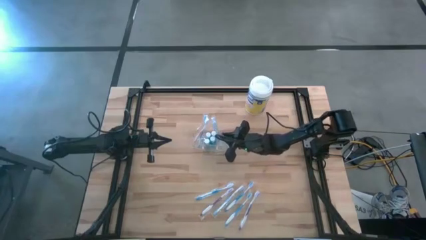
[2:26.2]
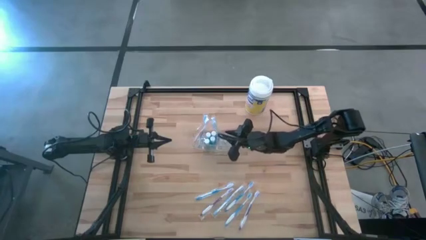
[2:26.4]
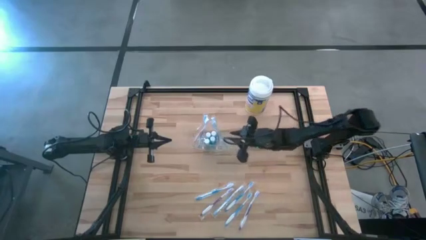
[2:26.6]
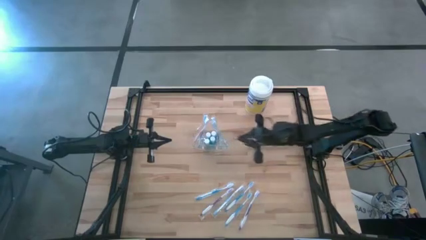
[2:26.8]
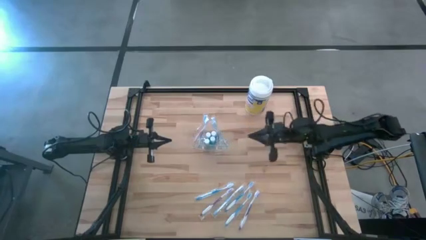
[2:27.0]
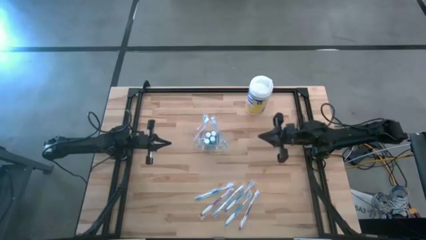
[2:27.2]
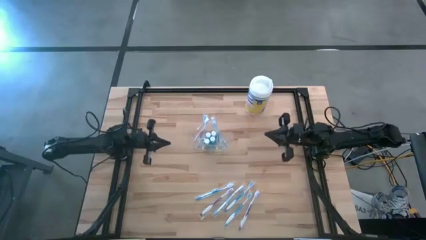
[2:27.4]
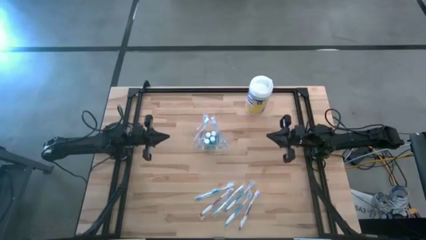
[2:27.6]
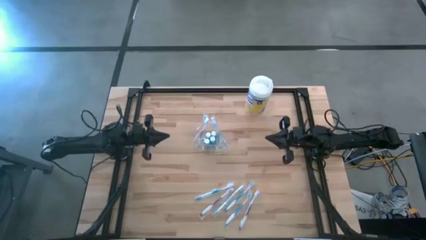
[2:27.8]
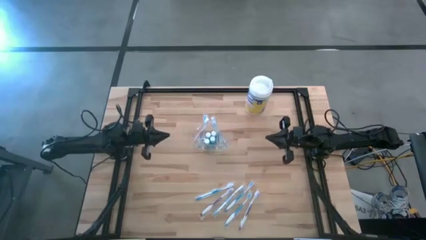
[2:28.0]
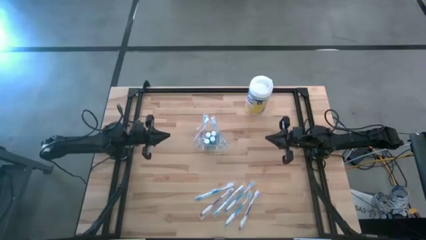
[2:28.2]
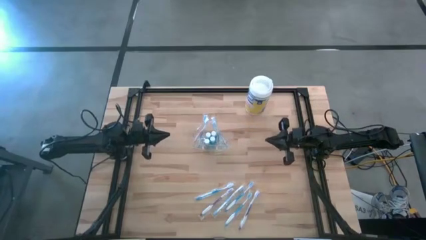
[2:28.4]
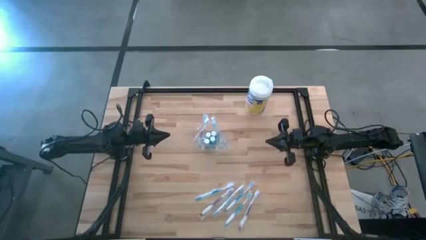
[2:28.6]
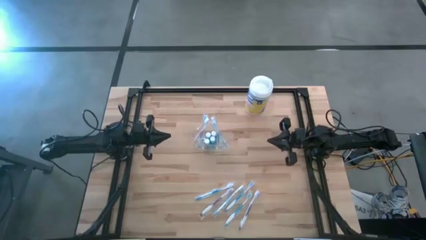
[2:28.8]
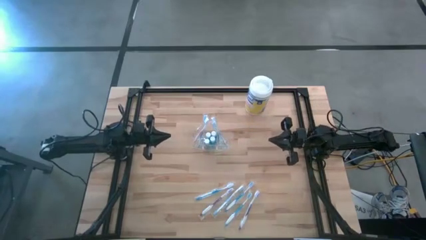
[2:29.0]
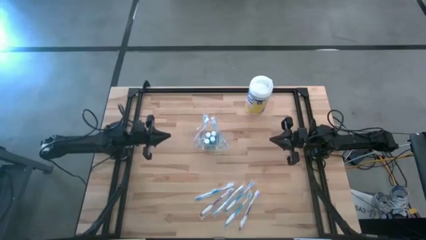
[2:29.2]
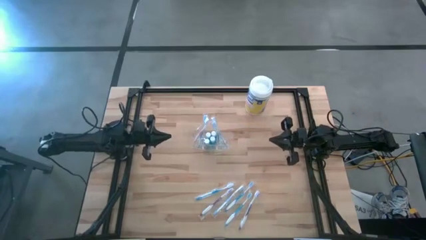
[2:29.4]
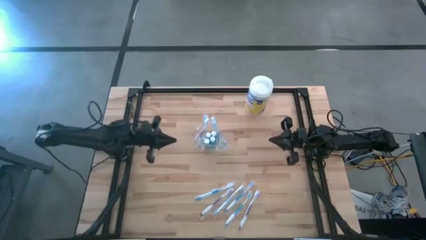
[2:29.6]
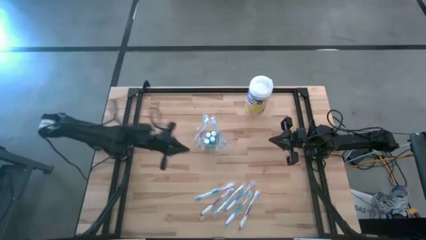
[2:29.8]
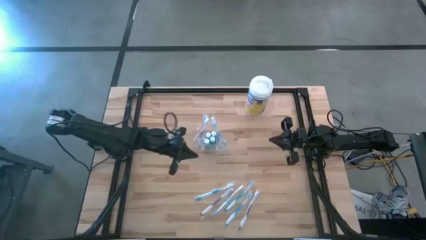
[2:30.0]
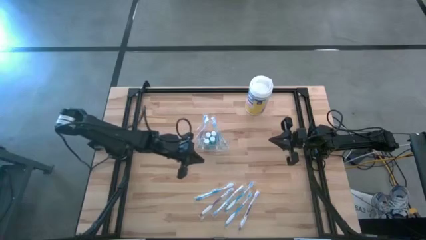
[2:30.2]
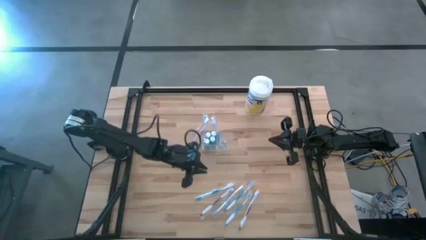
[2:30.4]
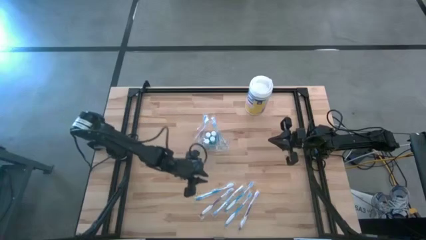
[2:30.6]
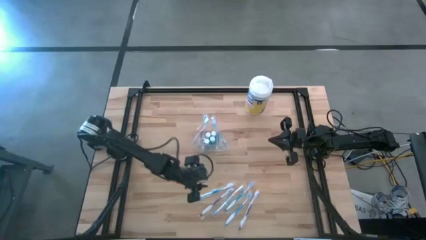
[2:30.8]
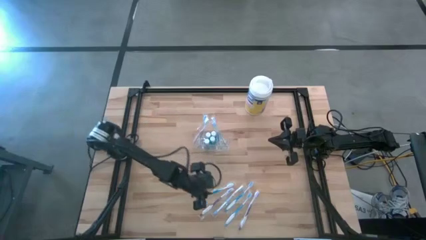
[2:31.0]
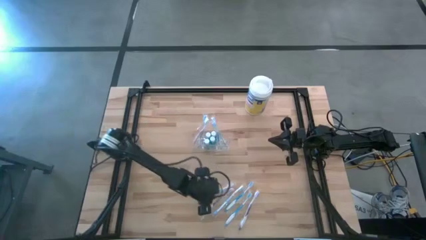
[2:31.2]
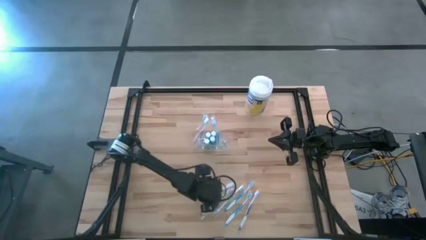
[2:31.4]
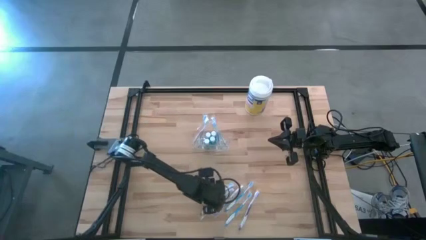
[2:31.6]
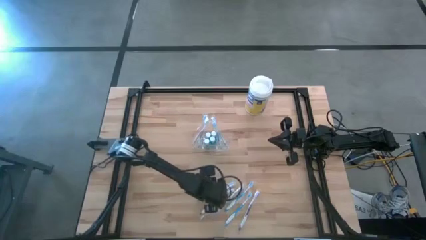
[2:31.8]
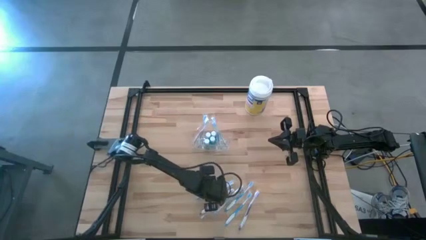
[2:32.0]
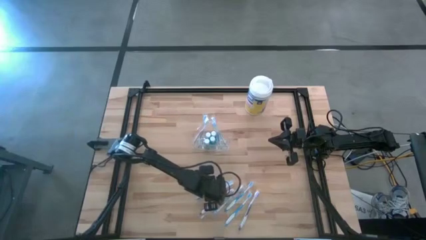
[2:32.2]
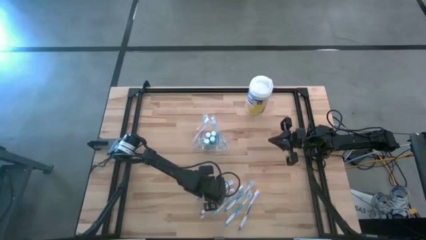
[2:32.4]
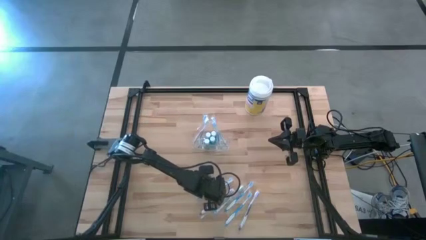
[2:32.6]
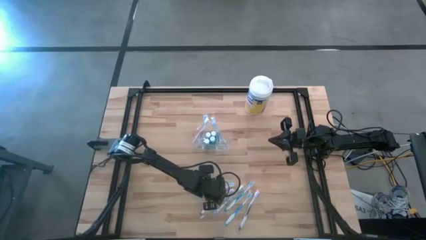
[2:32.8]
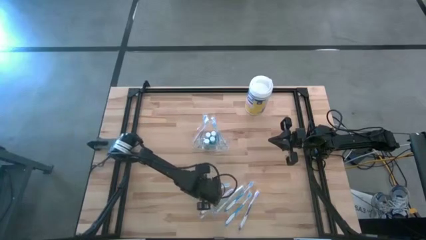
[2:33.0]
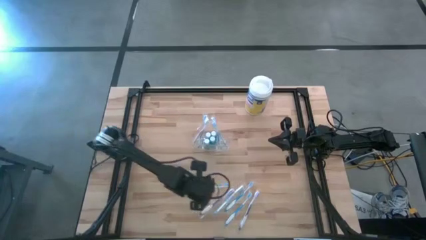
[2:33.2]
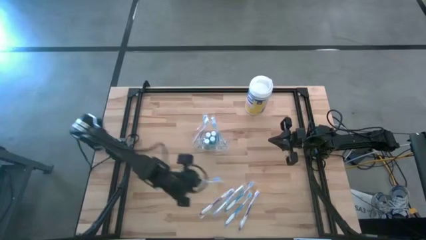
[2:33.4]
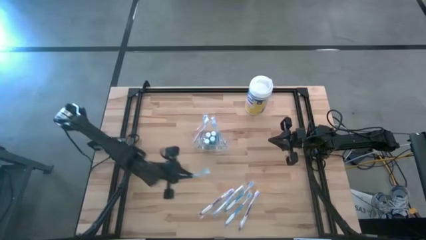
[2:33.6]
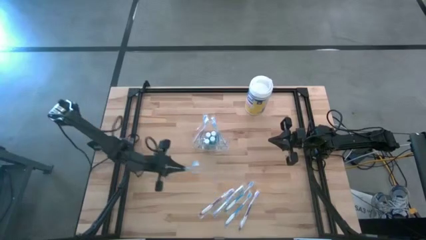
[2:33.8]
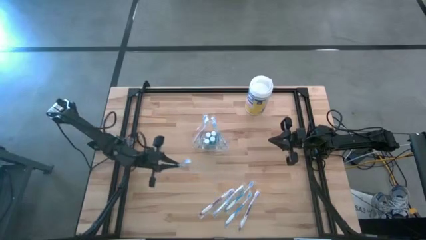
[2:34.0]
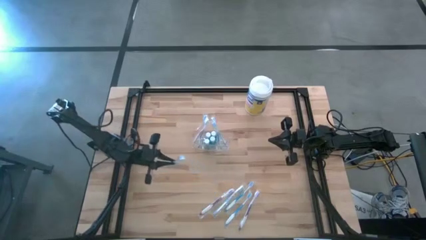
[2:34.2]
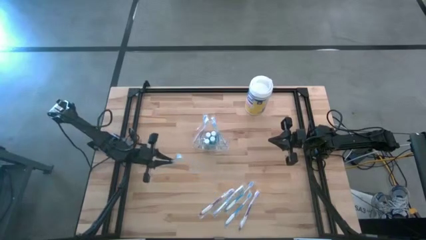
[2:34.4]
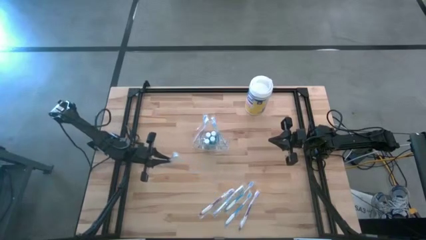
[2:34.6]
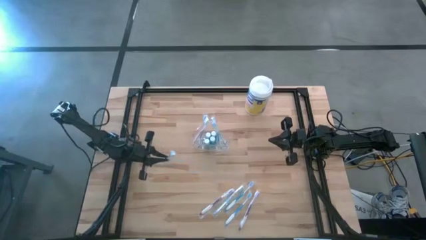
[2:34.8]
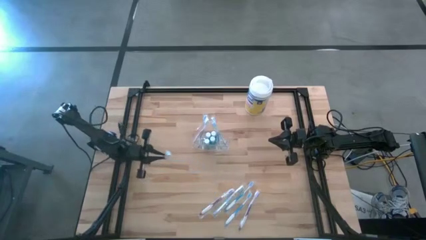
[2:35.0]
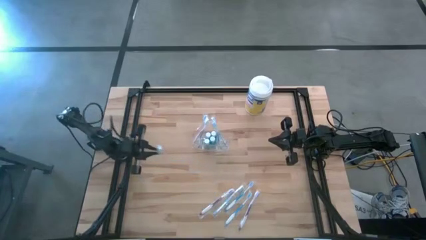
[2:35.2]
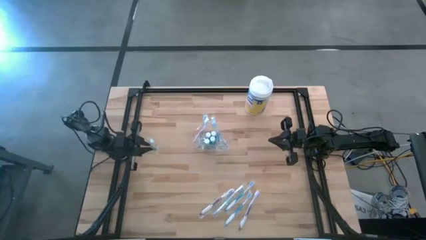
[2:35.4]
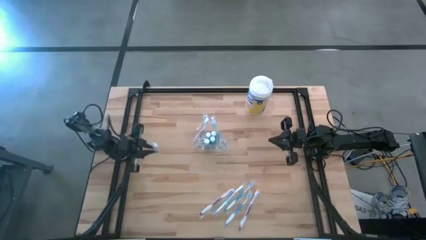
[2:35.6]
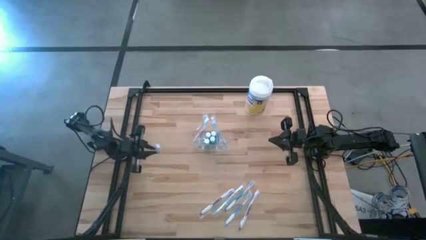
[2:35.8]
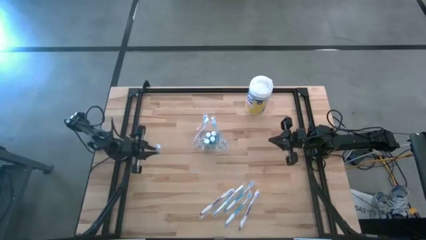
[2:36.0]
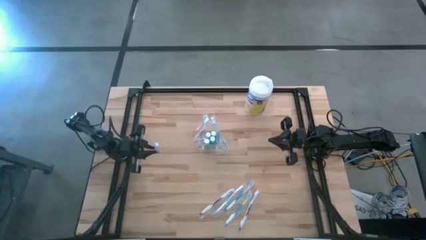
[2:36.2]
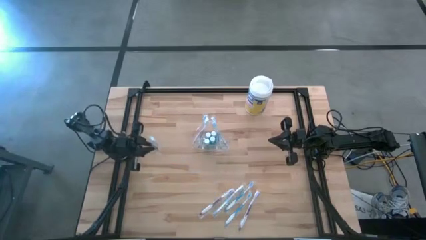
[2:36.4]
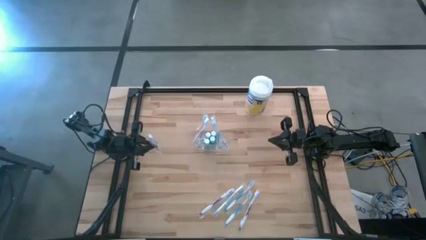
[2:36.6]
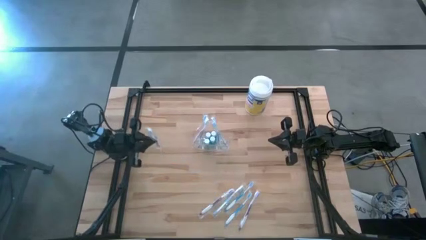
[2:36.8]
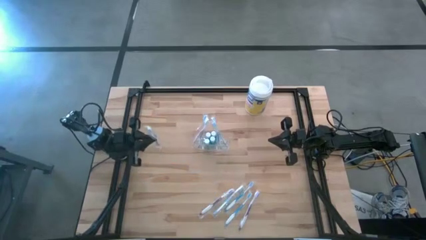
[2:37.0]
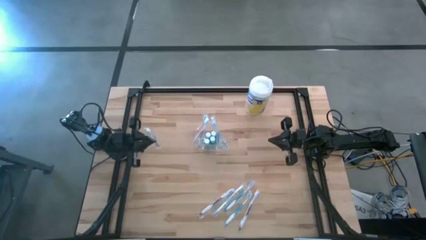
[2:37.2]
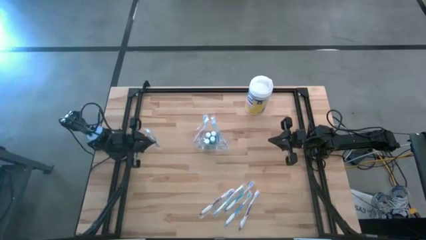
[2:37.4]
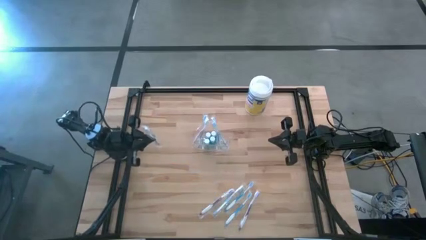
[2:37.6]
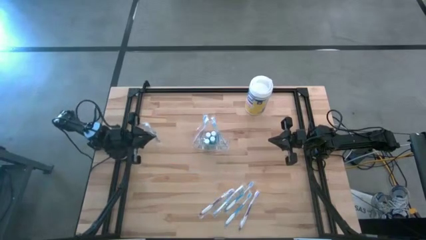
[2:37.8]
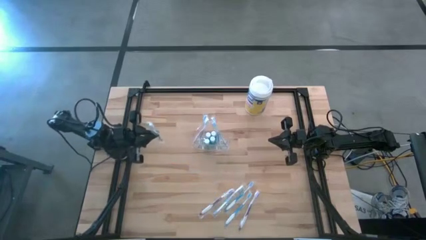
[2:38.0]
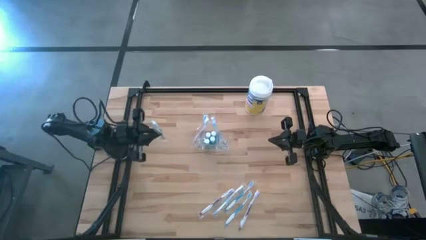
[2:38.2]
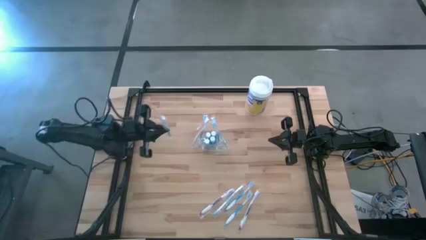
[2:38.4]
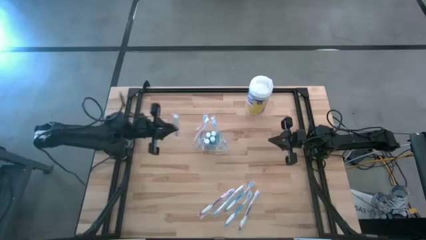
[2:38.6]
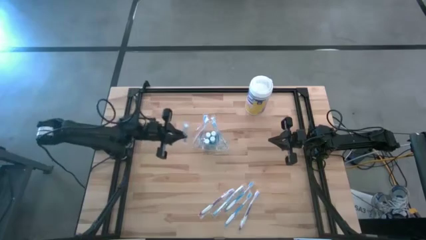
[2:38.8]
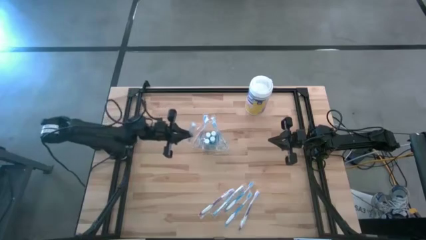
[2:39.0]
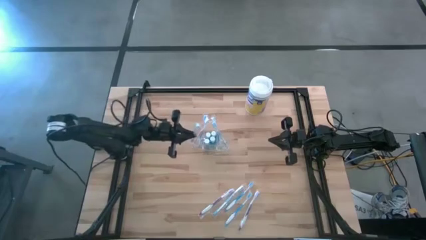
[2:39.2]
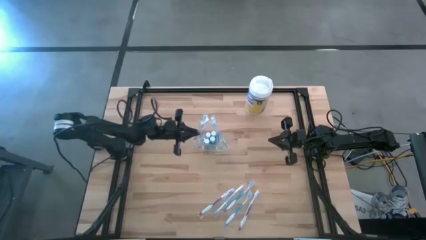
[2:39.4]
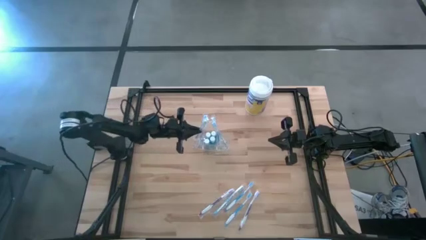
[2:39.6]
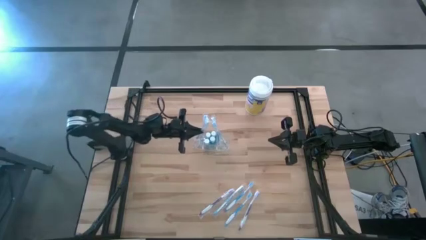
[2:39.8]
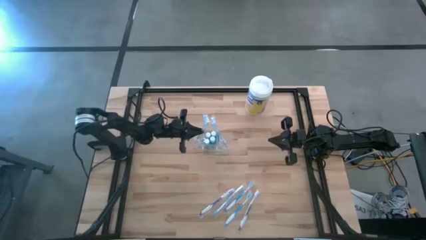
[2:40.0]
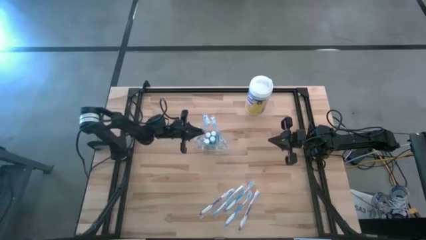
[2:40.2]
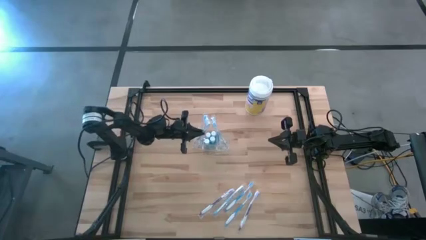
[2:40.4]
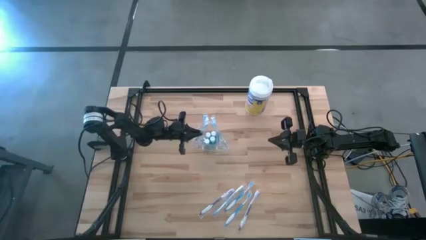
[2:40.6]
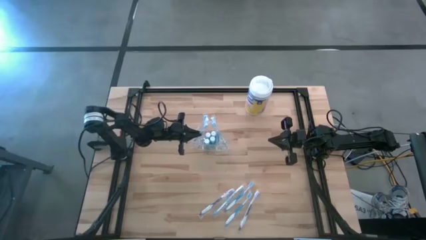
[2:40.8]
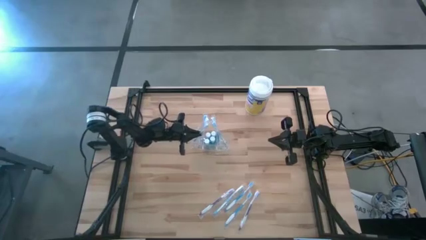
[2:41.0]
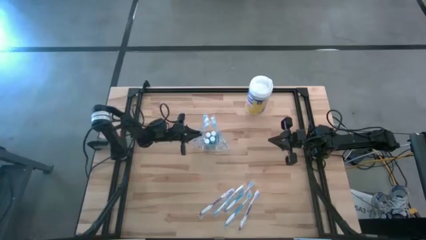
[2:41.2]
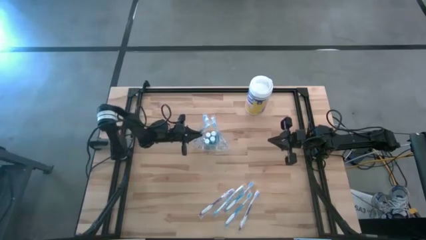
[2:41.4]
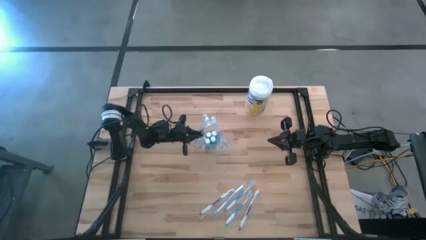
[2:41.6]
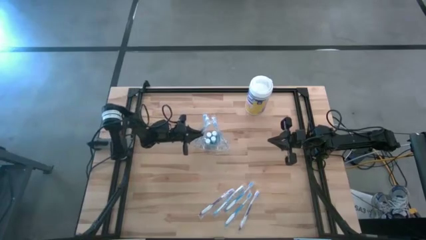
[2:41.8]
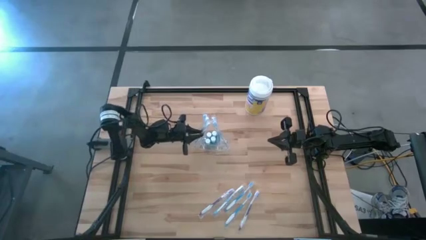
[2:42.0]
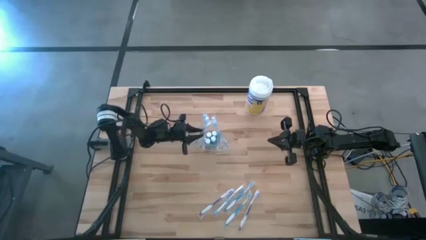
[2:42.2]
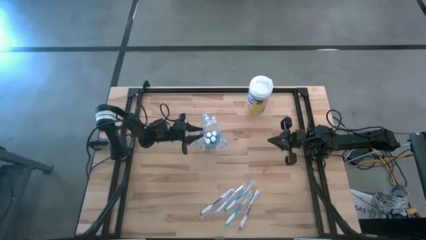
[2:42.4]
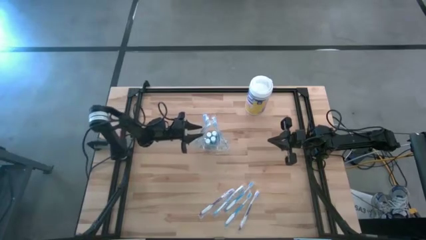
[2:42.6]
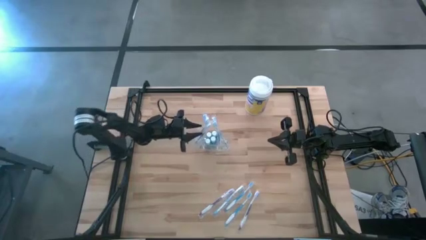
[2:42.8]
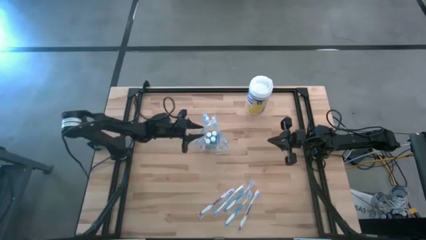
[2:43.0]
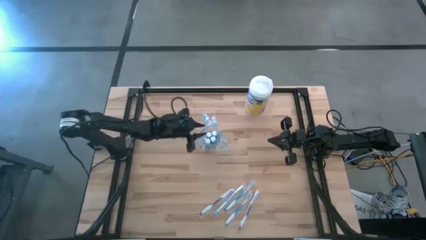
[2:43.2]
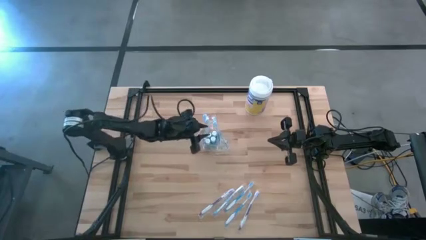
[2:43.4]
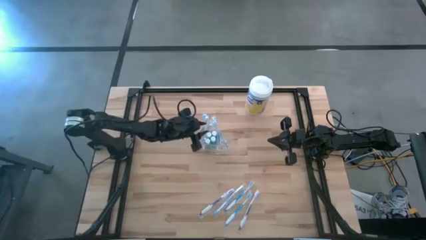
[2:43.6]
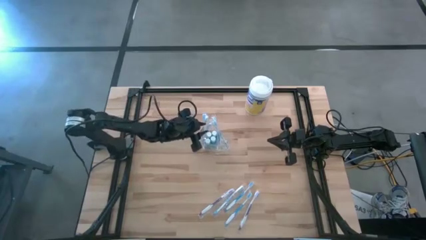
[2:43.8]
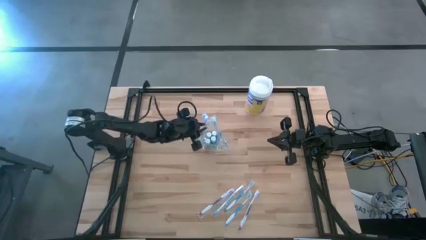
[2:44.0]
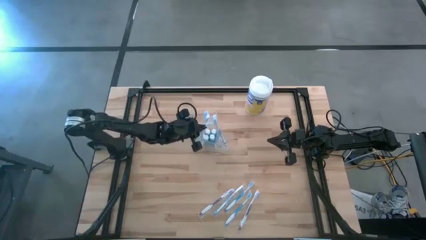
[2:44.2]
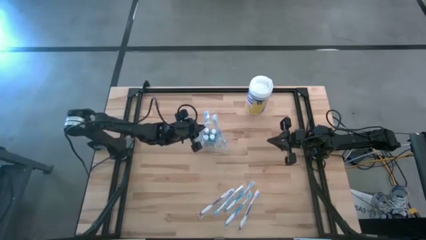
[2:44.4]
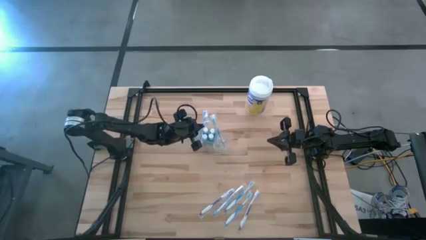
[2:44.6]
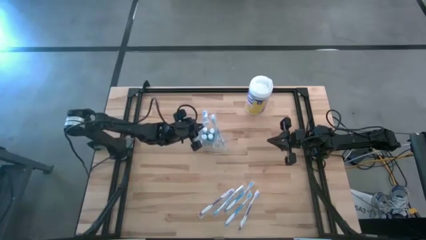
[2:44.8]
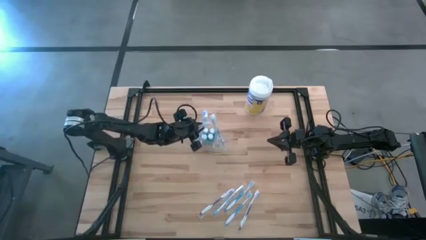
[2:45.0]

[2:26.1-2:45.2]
Task: Pick & Place toothbrushing station
Put the blue toothbrush into the transparent organizer
